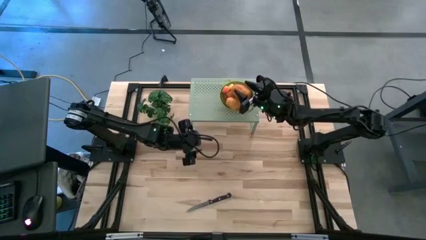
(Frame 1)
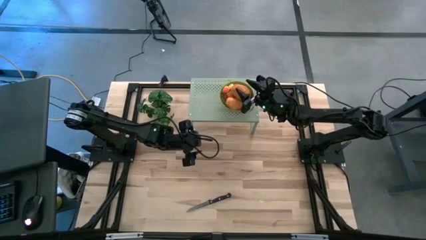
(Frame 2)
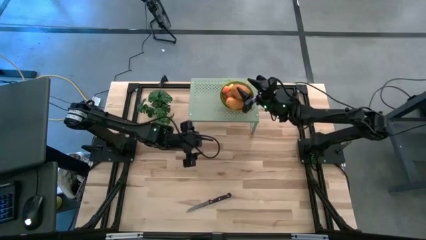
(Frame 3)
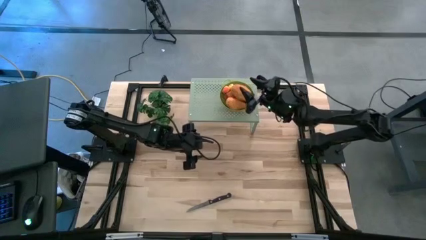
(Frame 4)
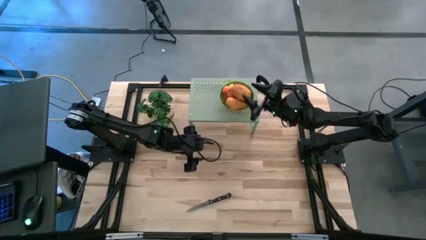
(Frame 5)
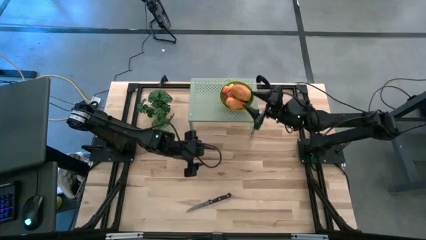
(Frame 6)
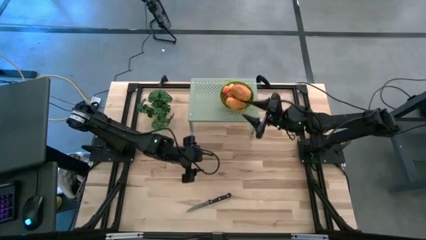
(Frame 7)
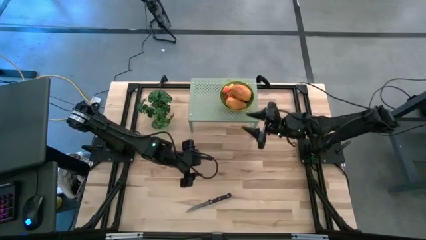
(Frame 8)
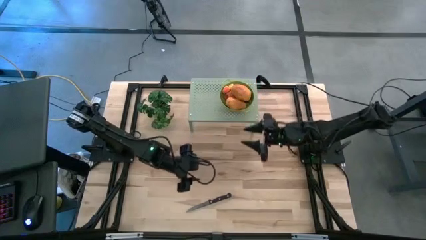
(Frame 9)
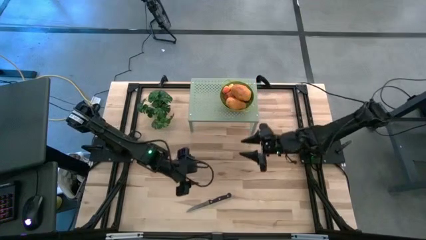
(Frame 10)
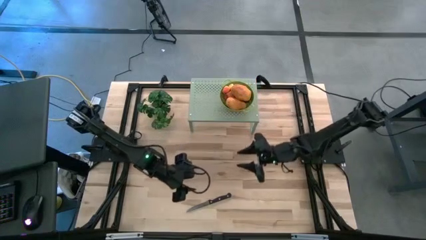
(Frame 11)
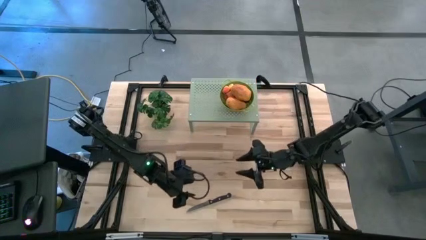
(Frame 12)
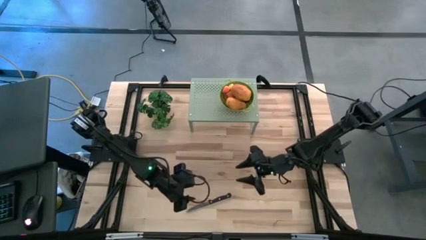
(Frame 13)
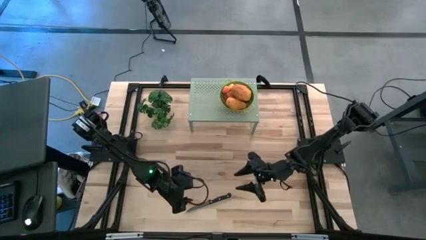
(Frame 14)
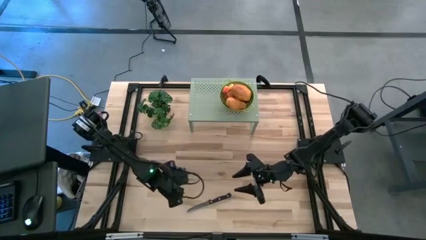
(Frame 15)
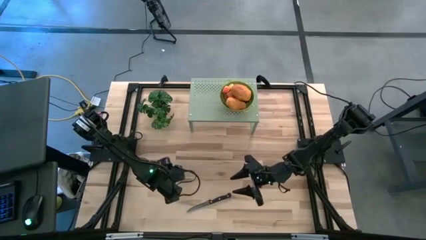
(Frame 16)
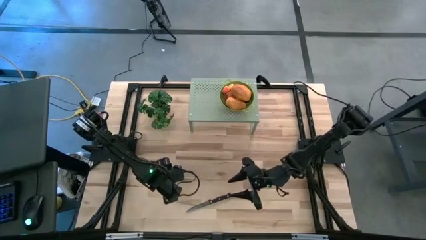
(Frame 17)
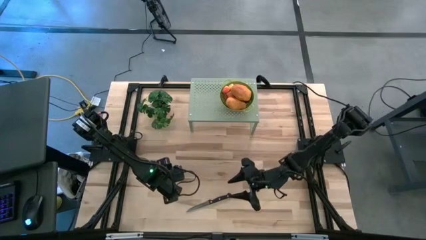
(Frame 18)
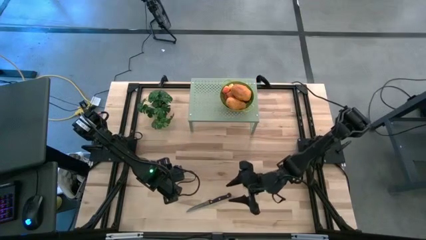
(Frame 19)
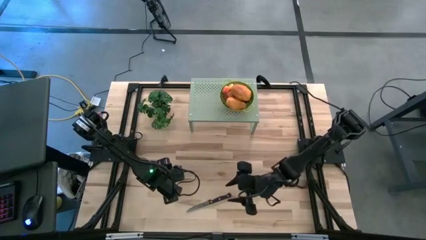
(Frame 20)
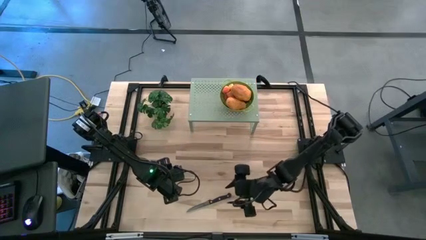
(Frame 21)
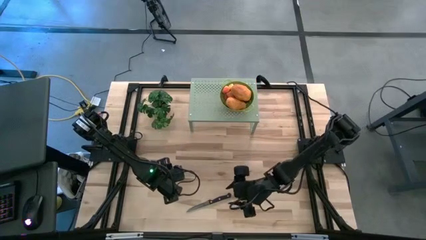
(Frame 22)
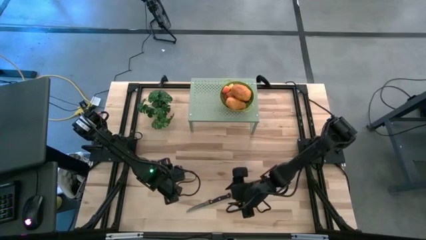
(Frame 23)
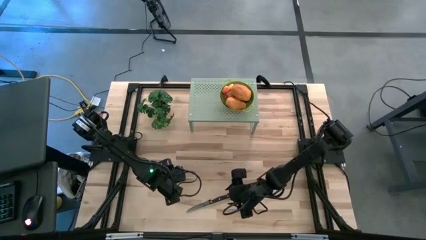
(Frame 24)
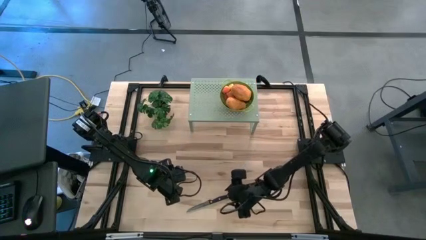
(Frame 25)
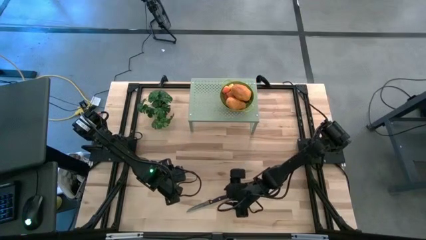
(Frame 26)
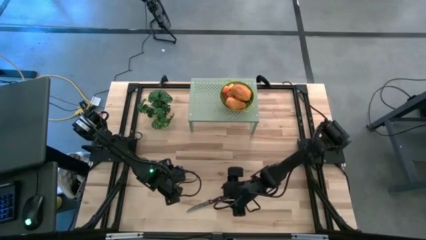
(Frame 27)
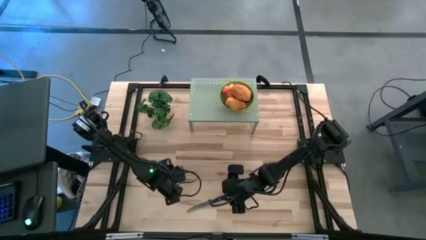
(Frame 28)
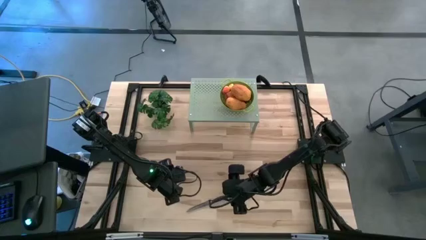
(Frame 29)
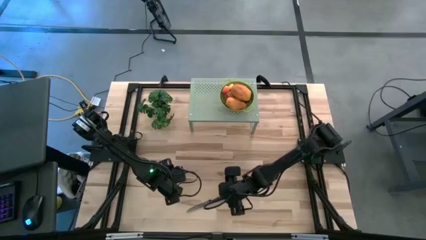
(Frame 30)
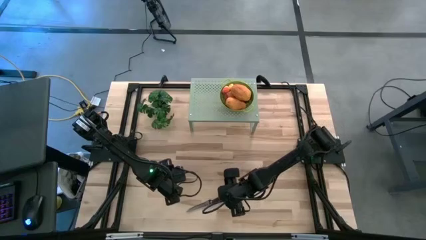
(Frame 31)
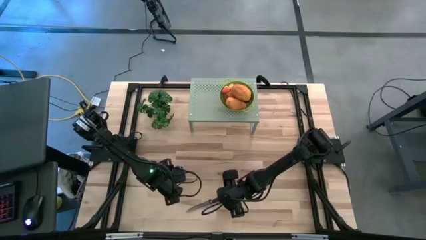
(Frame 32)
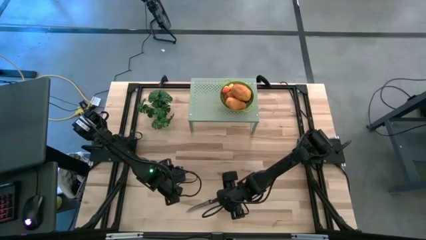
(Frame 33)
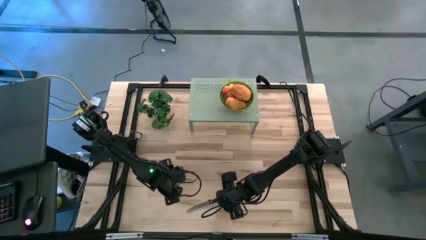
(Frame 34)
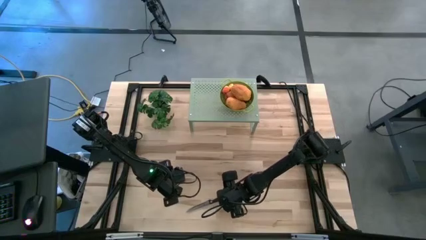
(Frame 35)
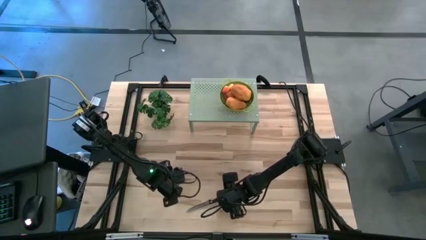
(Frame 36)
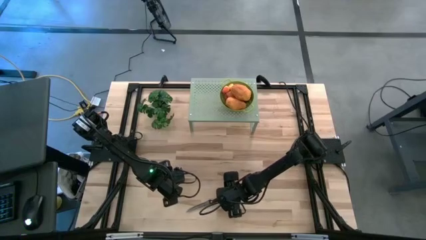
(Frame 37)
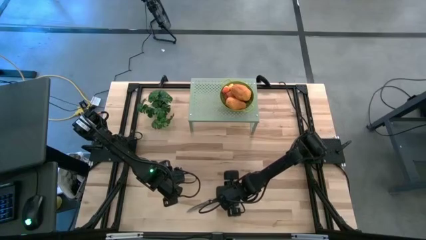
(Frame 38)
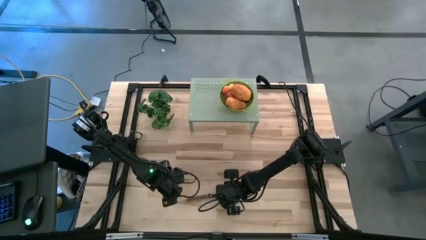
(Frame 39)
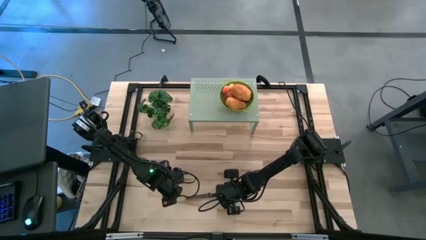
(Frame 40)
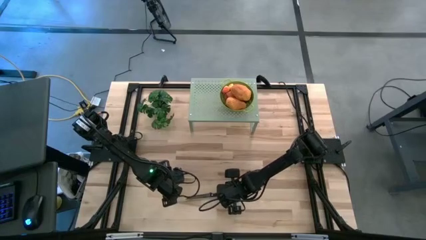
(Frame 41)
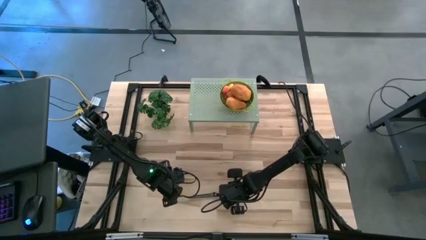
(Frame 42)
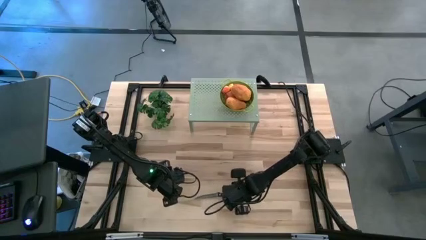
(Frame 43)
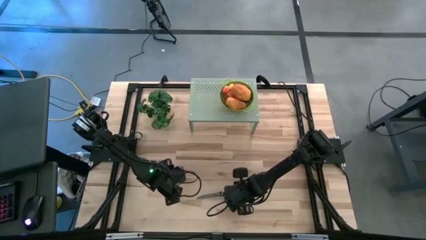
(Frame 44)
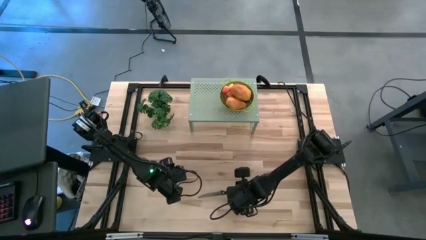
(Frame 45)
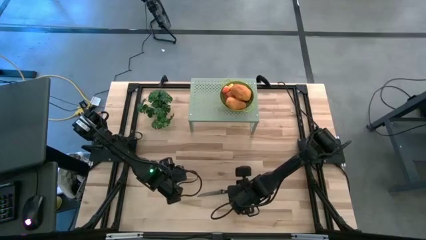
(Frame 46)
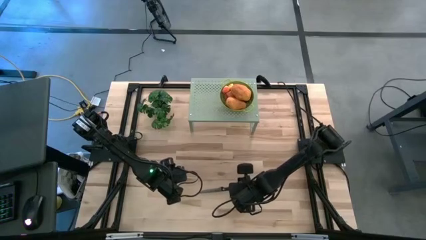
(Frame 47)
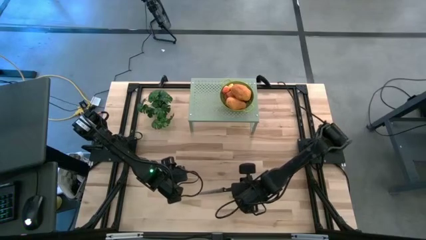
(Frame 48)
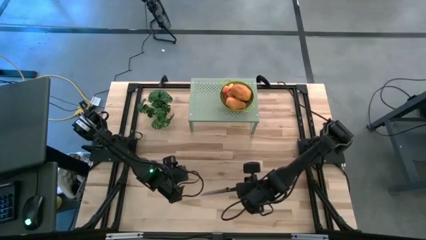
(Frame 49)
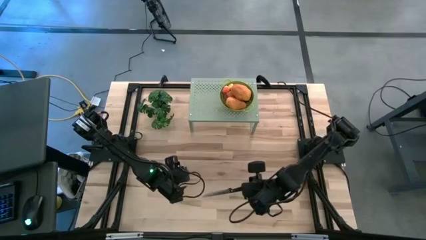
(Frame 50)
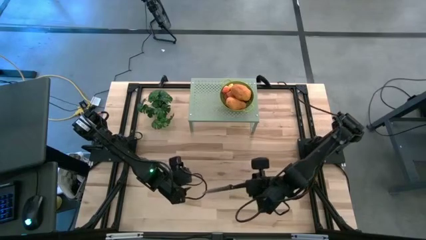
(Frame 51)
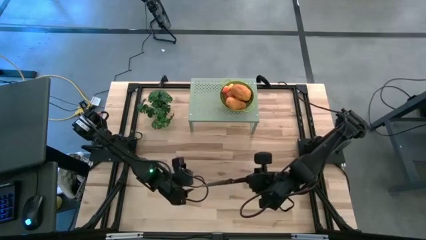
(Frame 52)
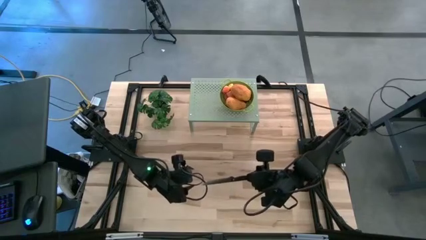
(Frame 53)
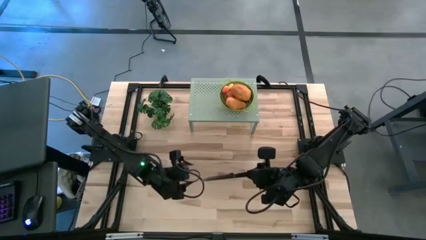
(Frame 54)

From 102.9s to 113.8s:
Task: Pick & Place Fruit
Put the knife on the shelf
